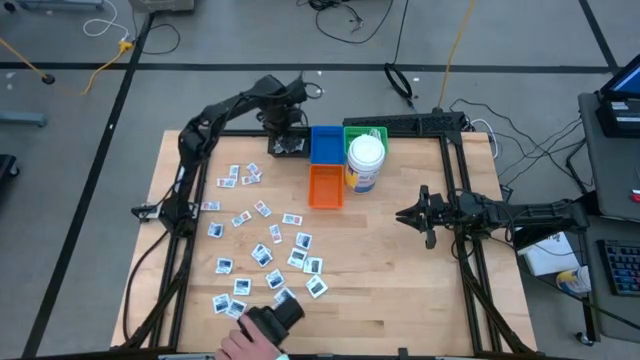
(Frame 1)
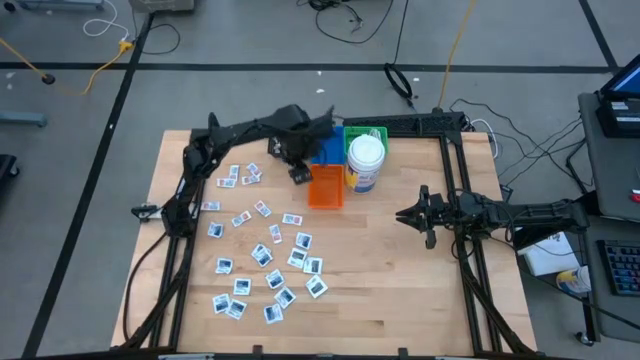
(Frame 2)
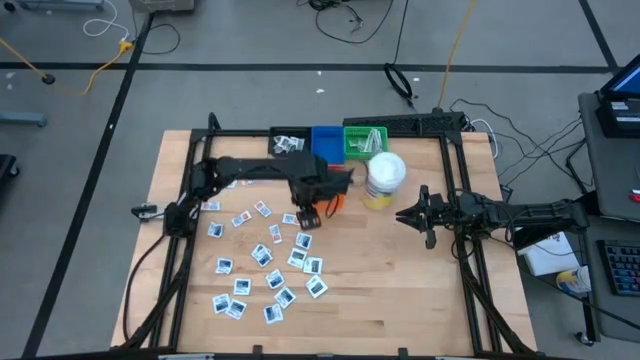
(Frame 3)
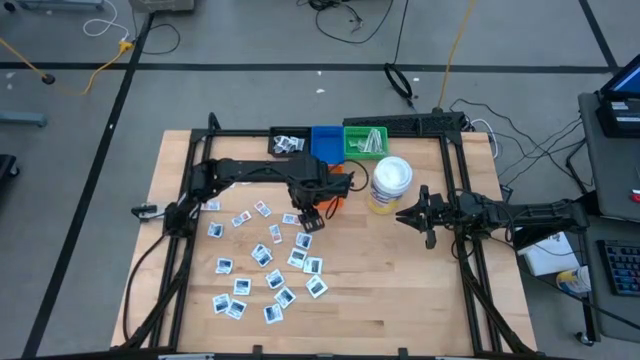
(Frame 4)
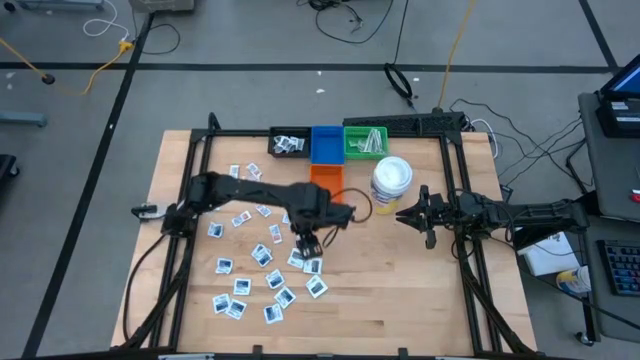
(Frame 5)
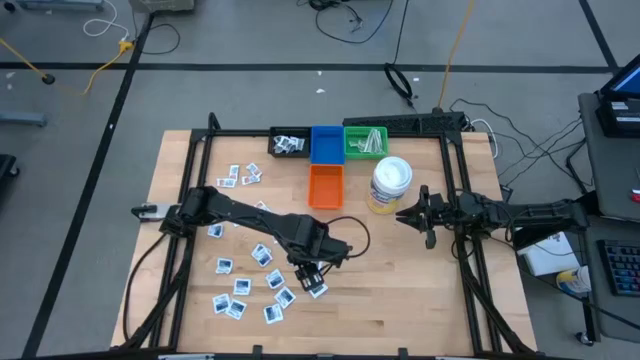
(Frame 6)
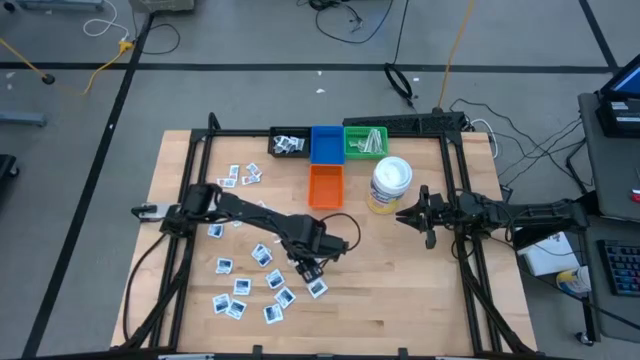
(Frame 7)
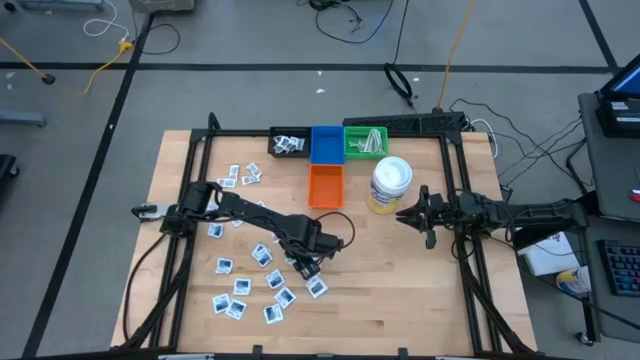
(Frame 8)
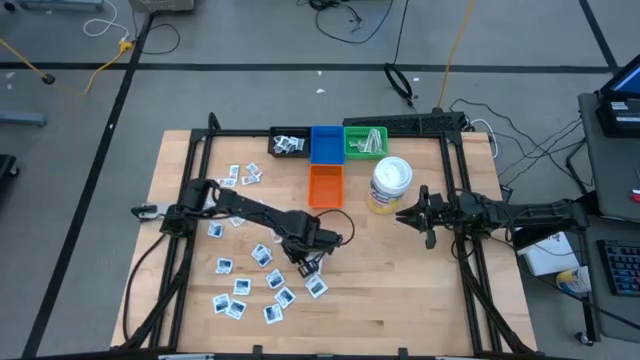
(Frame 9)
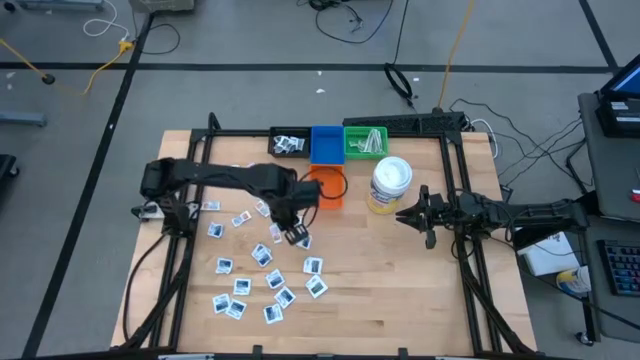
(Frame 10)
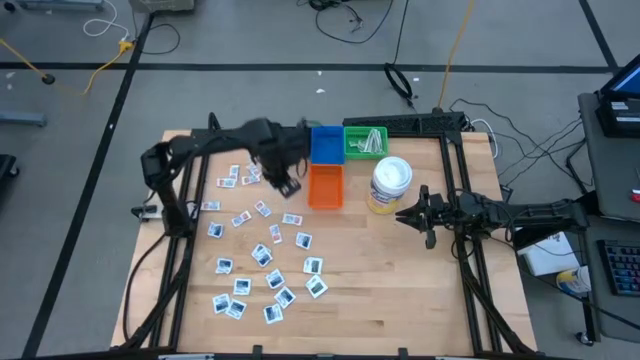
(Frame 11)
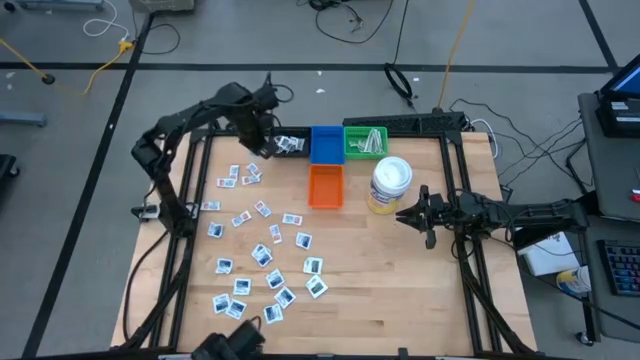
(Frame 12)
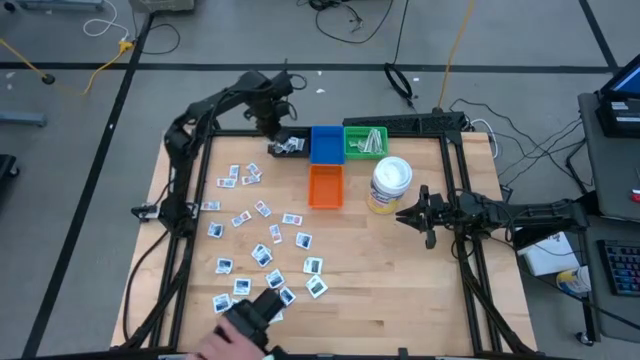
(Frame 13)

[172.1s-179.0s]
Task: Pick & Place First Aid Supplies
Put the gray towelette pack into the black bin

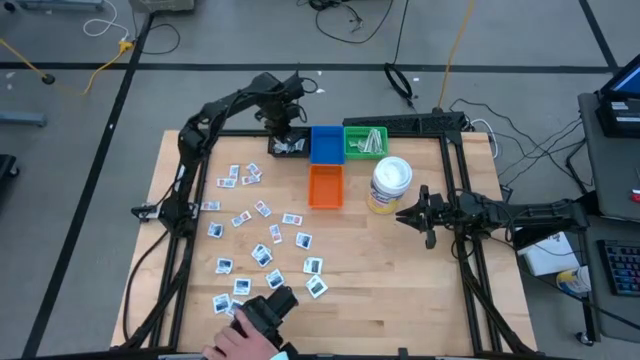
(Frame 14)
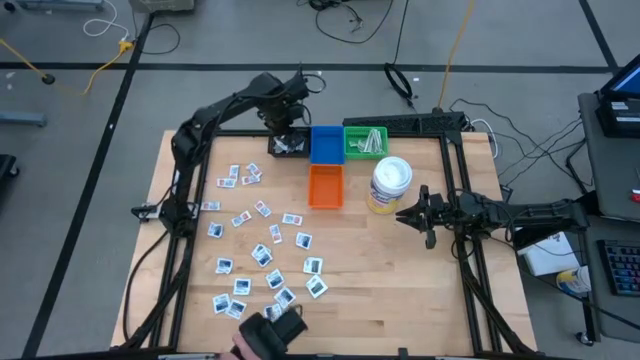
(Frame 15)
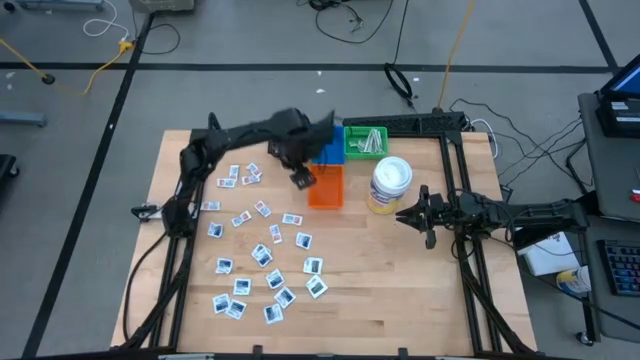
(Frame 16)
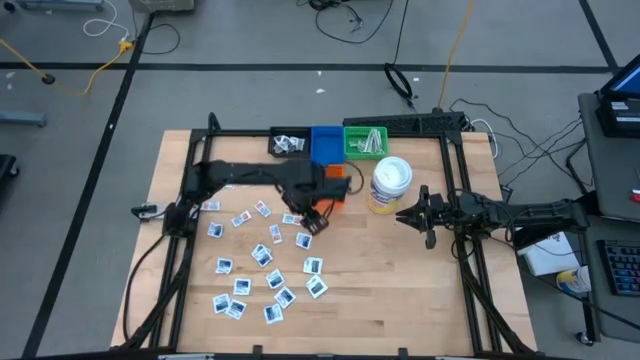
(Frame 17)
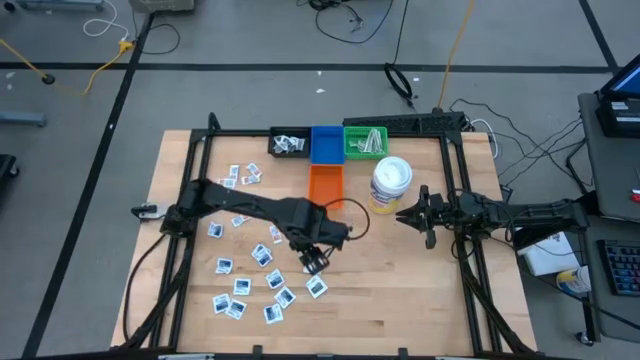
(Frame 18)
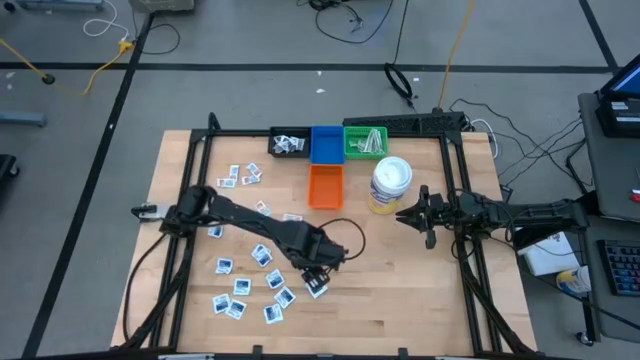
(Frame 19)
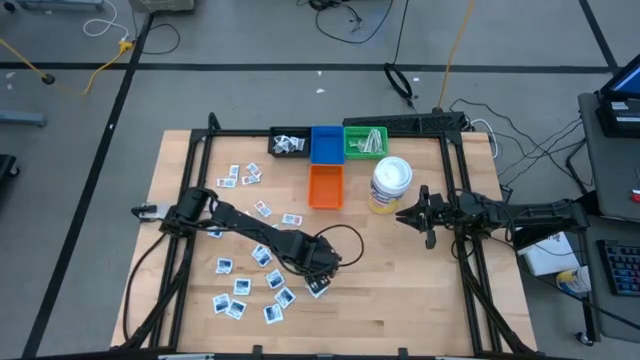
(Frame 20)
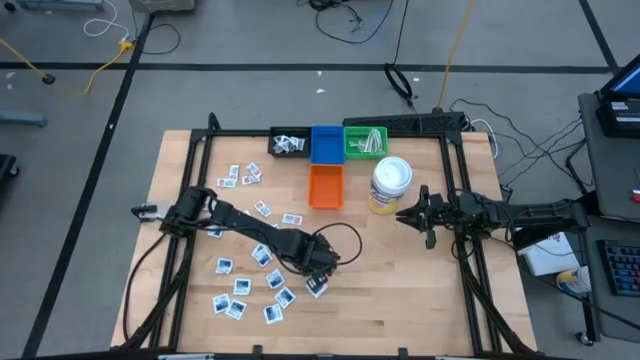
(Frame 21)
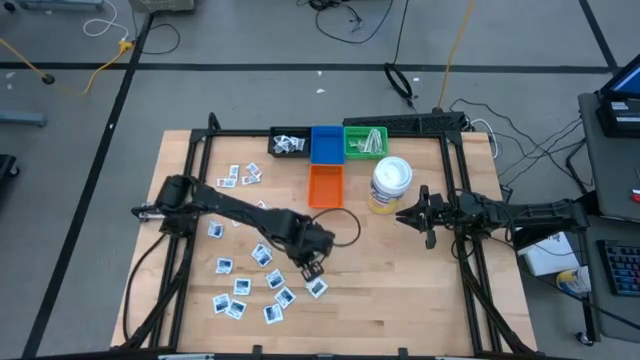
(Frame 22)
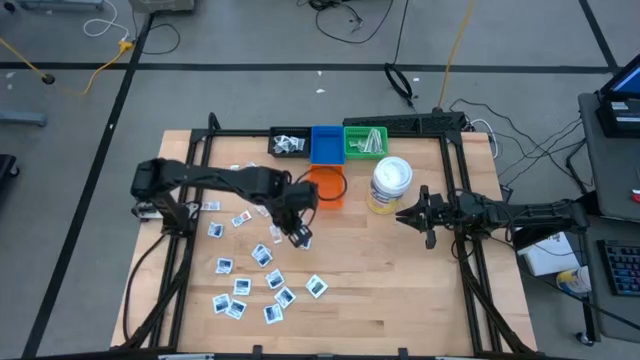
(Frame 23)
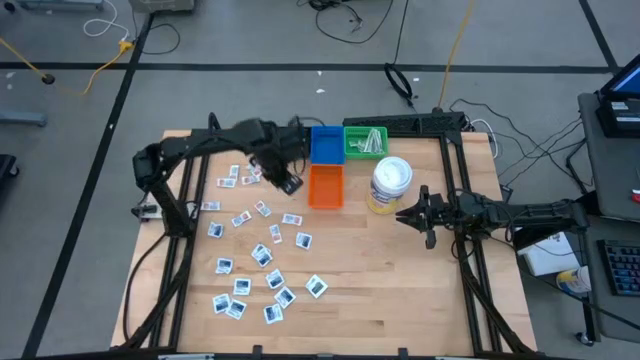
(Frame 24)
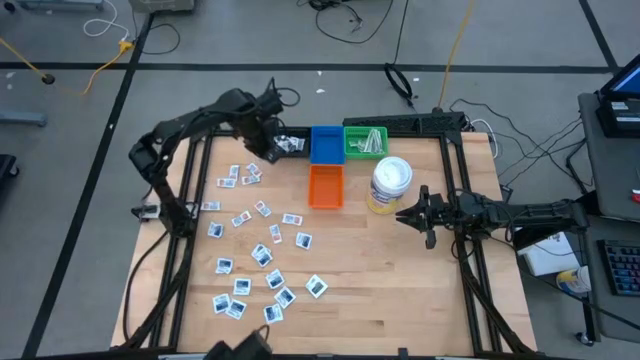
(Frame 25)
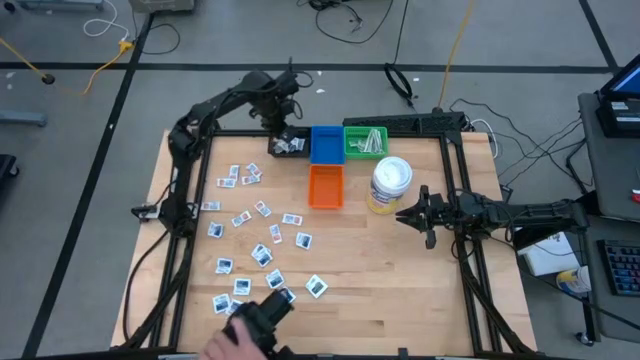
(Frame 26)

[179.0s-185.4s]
Put the gray towelette pack into the black bin

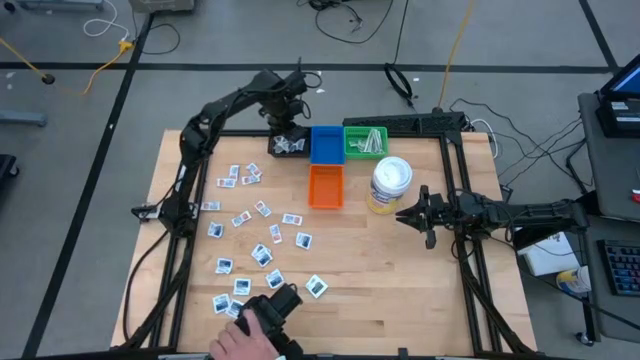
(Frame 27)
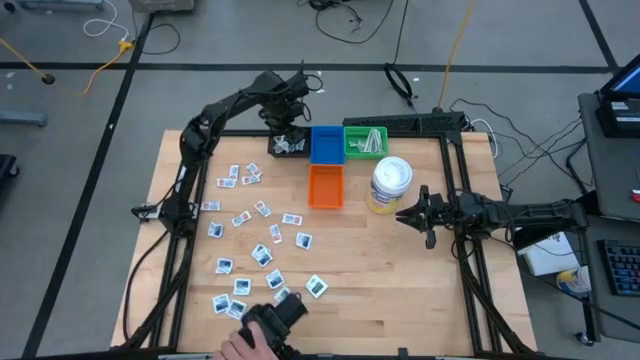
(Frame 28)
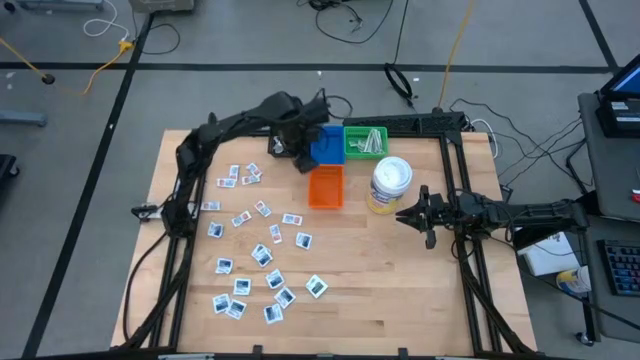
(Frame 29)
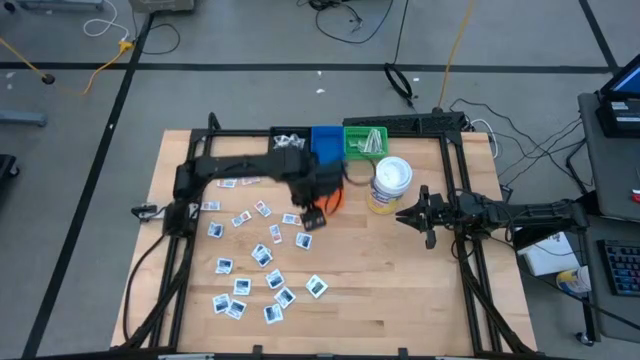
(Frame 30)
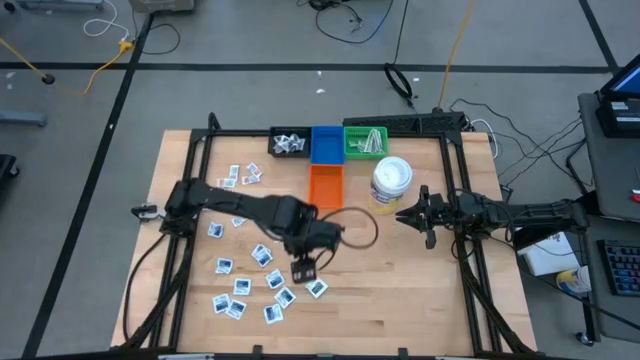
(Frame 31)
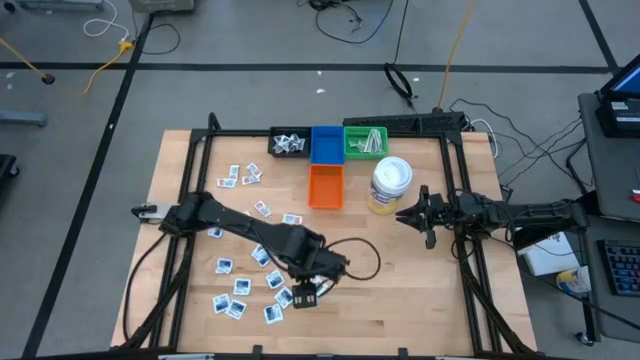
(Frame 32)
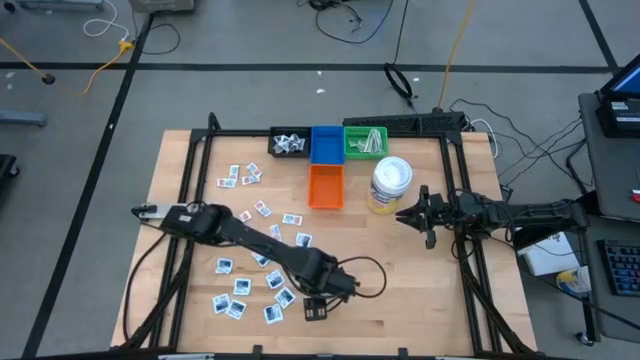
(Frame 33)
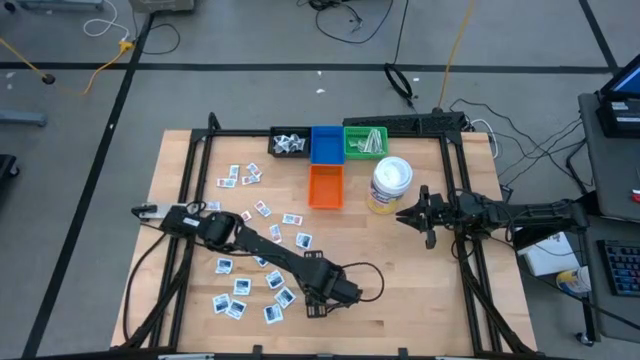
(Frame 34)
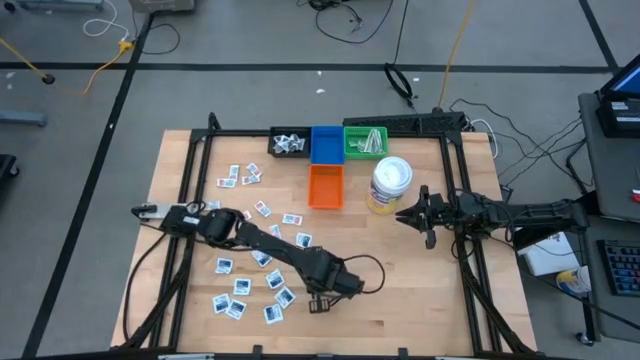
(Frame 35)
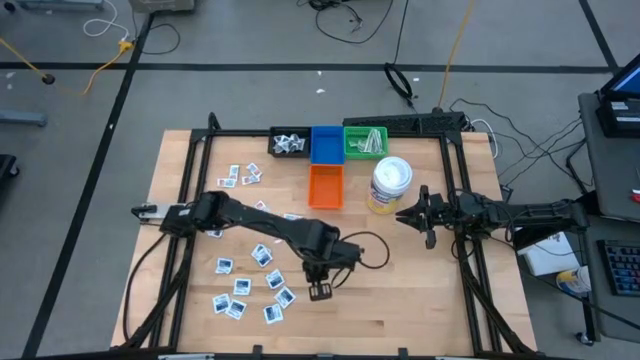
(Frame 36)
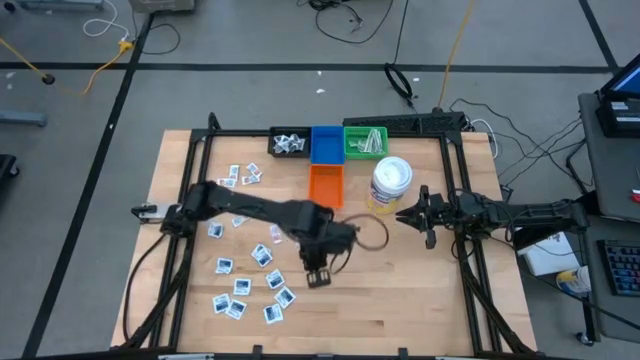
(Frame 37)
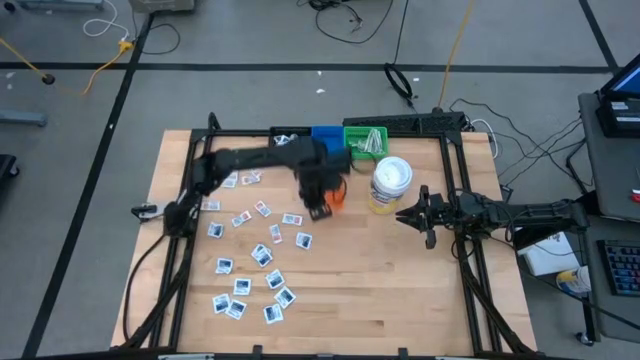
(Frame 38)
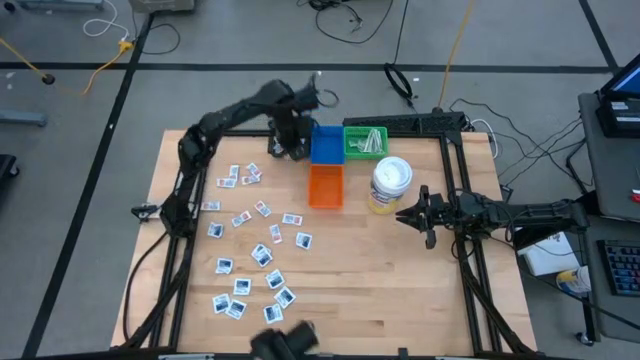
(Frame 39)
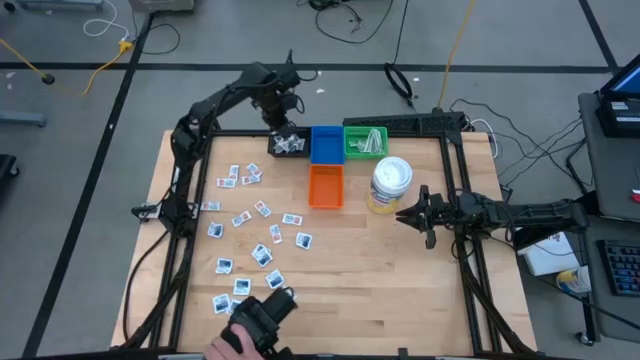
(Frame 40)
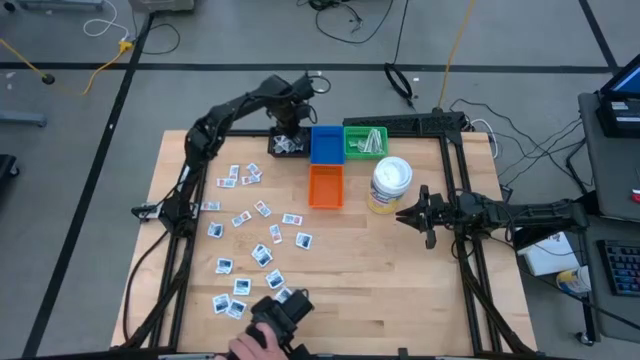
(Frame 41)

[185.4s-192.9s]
Put the gray towelette pack into the black bin

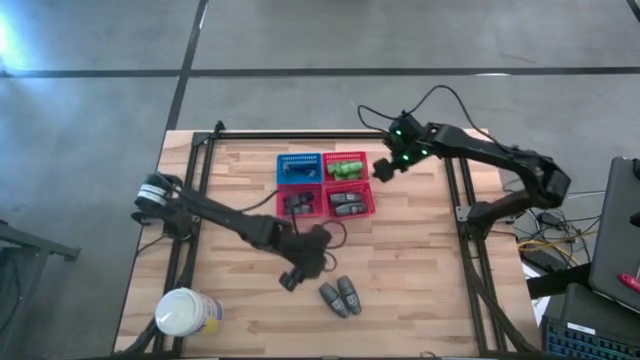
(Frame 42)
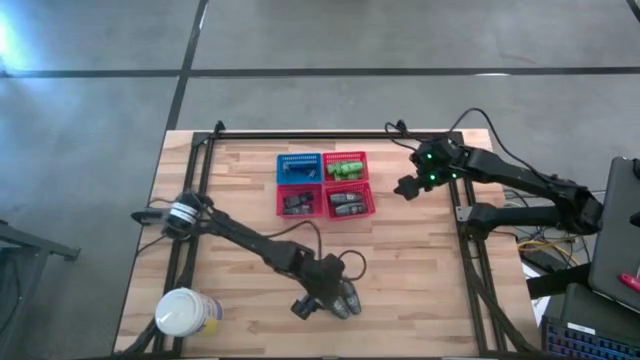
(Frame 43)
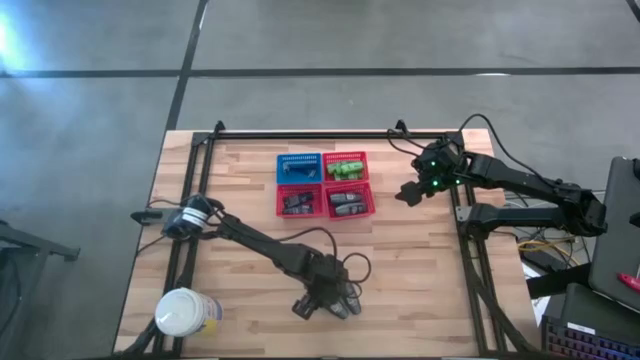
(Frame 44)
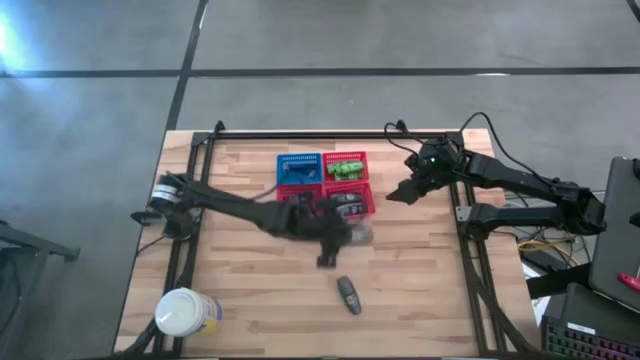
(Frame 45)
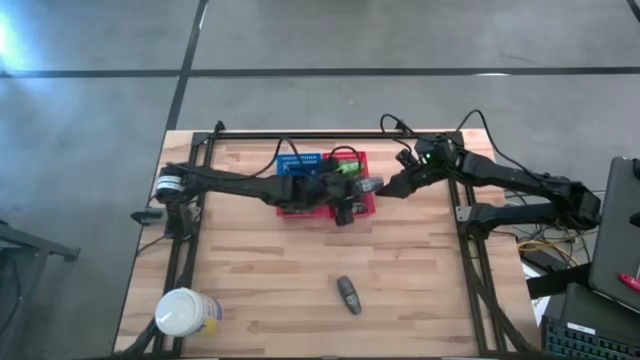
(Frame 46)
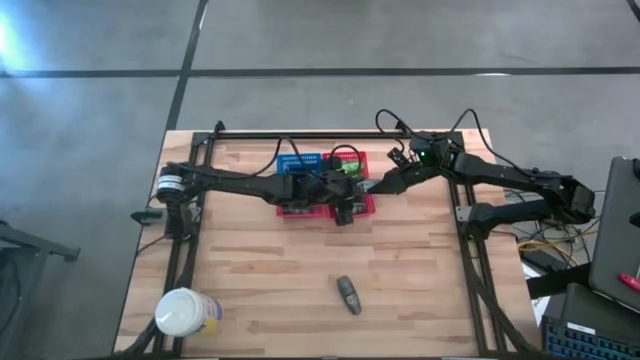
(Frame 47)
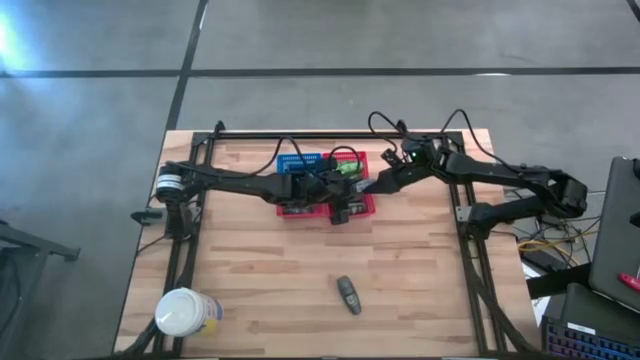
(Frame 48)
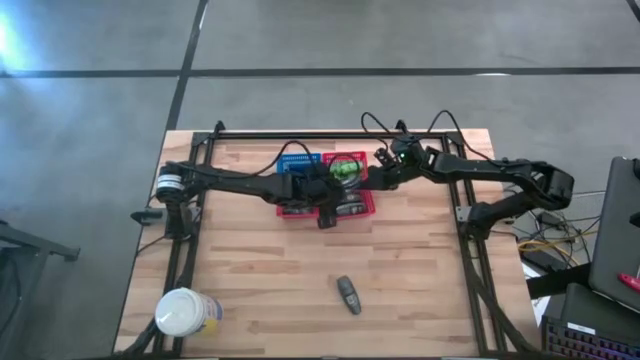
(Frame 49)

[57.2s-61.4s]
Task: Pick & Place Travel size toiletries
Put the deodorant into the bottom right red bin
